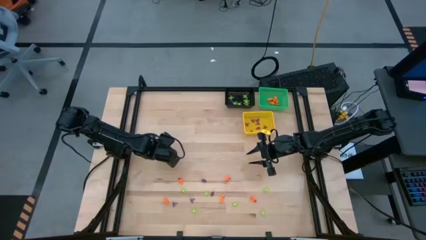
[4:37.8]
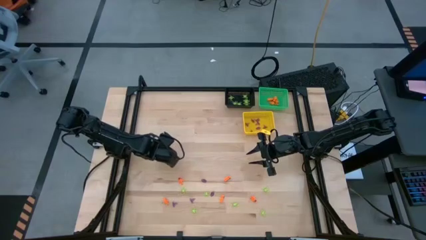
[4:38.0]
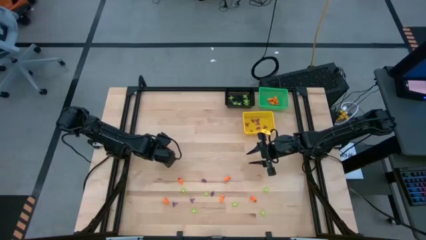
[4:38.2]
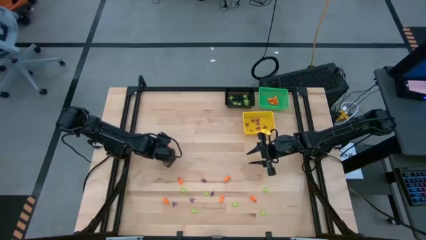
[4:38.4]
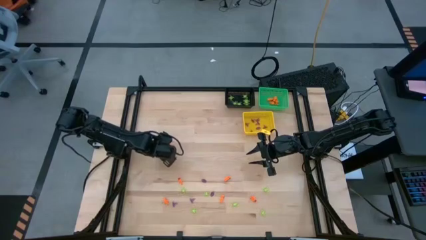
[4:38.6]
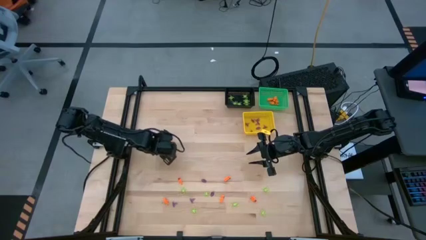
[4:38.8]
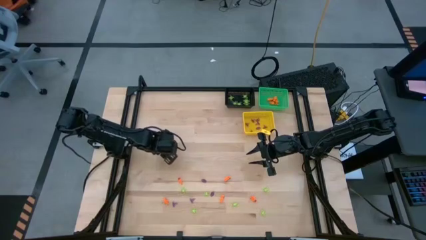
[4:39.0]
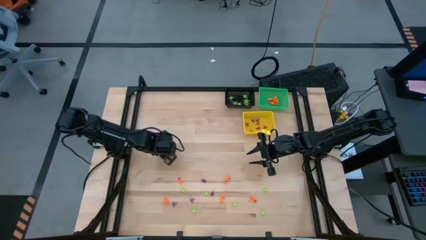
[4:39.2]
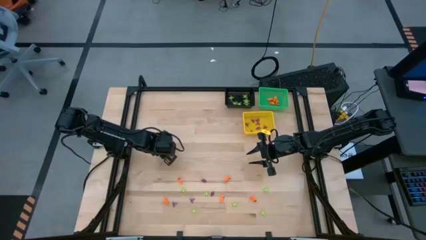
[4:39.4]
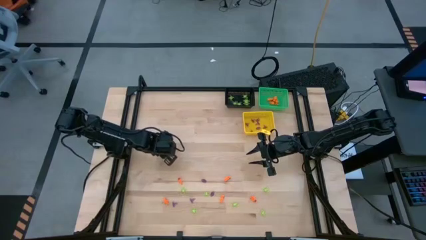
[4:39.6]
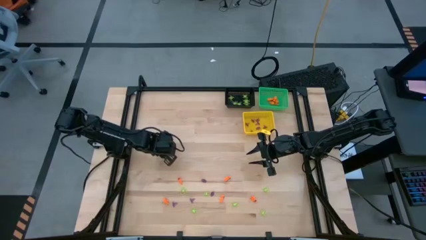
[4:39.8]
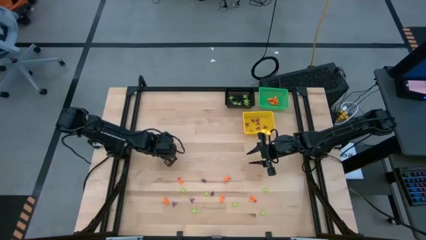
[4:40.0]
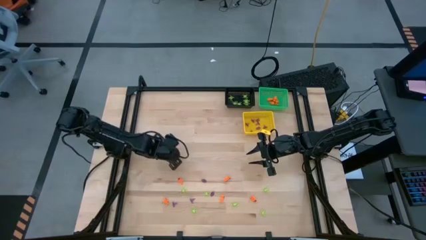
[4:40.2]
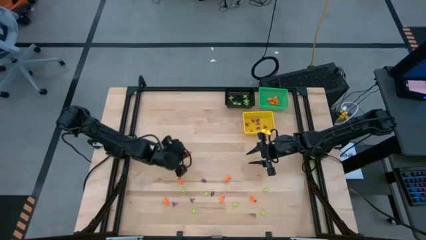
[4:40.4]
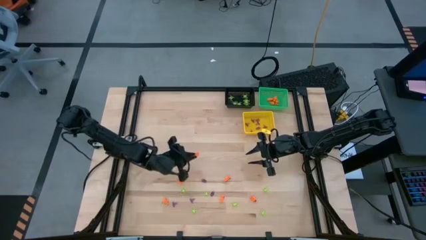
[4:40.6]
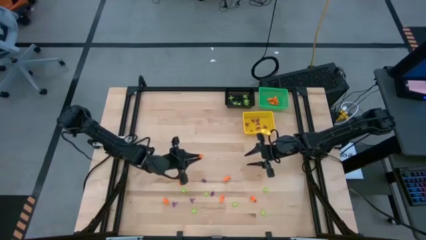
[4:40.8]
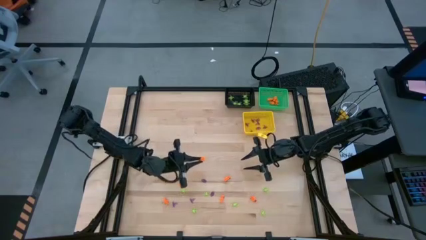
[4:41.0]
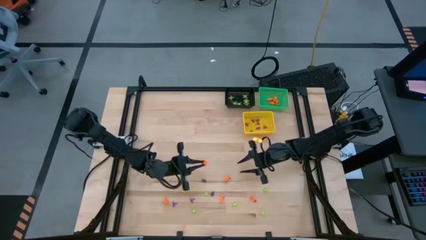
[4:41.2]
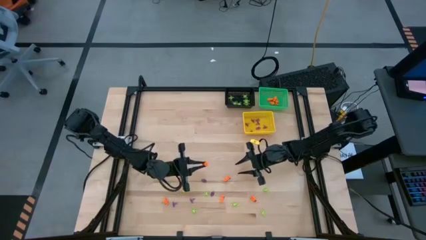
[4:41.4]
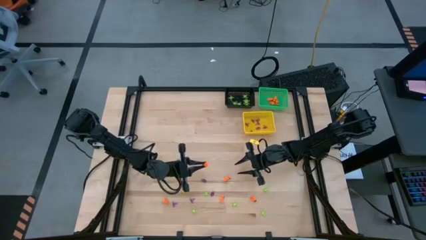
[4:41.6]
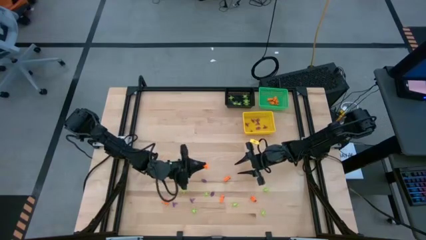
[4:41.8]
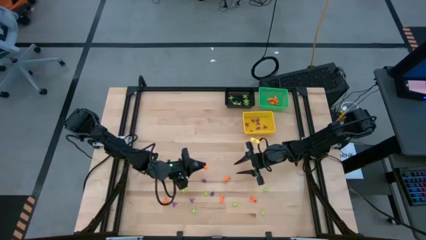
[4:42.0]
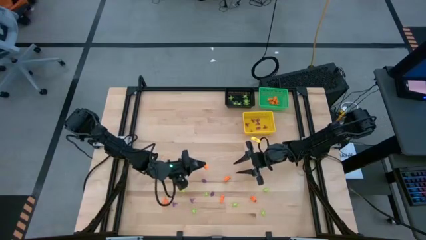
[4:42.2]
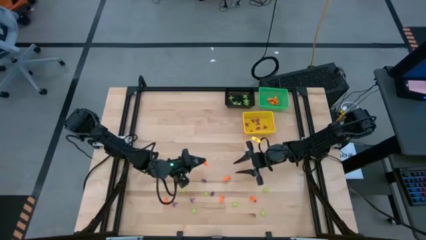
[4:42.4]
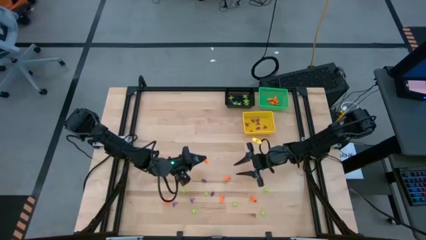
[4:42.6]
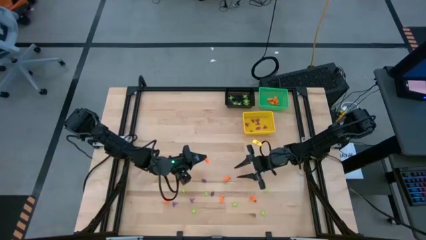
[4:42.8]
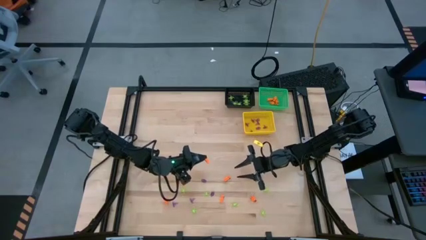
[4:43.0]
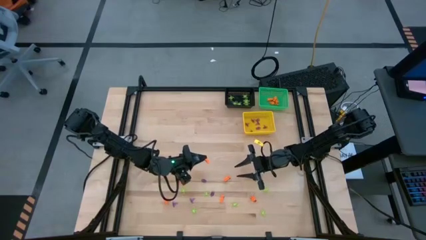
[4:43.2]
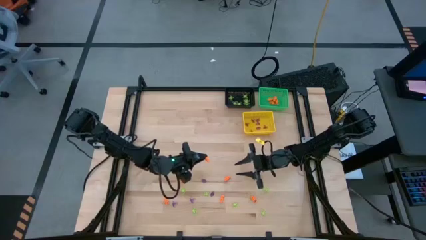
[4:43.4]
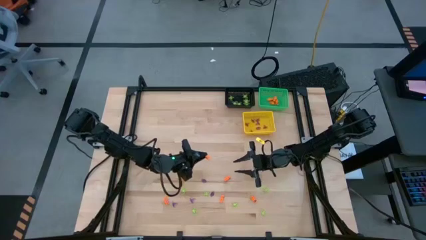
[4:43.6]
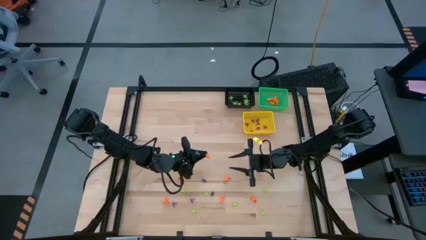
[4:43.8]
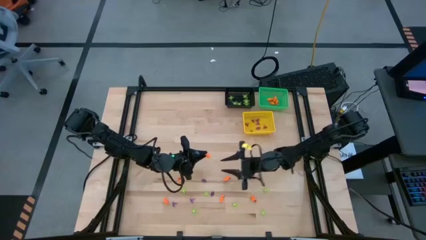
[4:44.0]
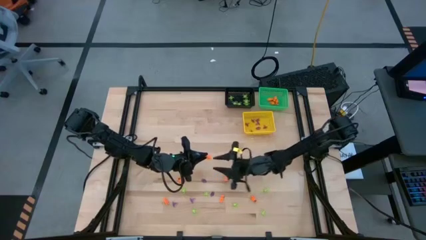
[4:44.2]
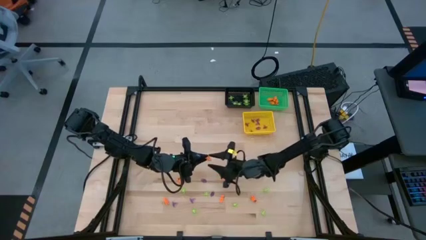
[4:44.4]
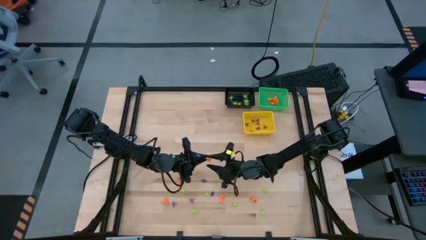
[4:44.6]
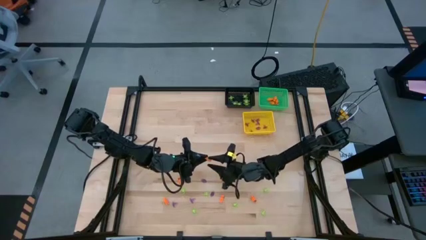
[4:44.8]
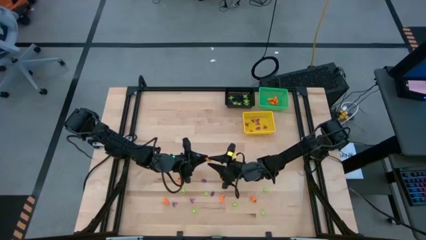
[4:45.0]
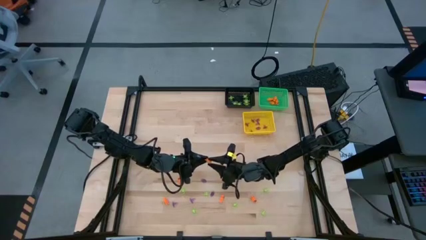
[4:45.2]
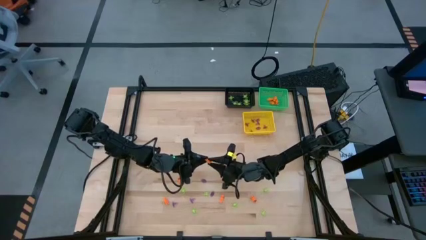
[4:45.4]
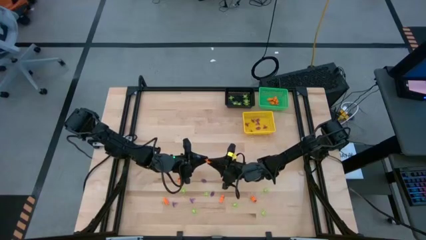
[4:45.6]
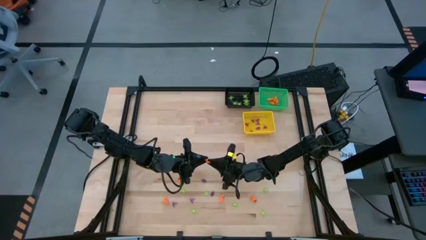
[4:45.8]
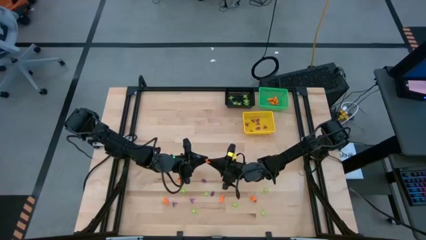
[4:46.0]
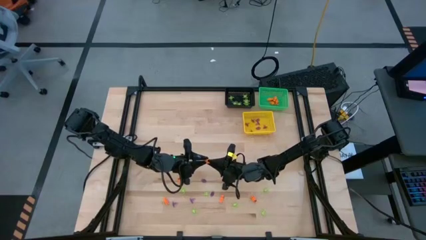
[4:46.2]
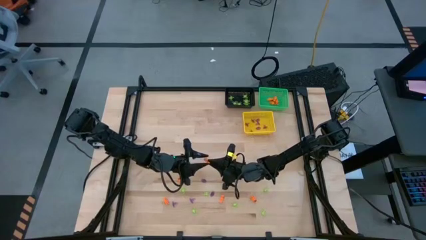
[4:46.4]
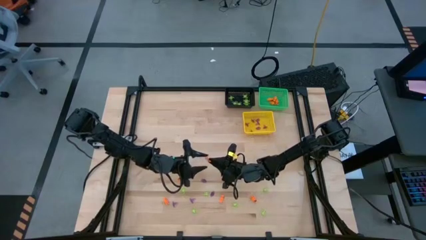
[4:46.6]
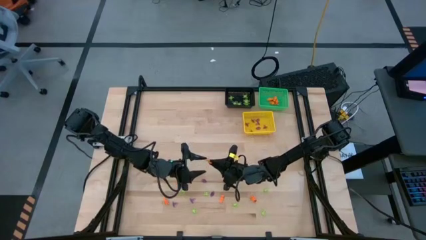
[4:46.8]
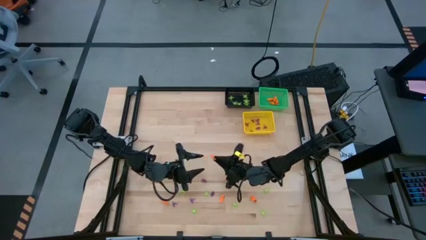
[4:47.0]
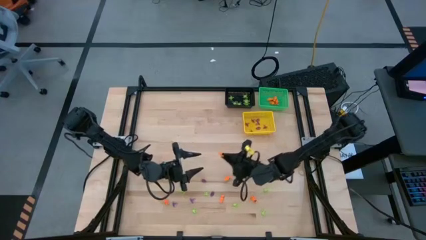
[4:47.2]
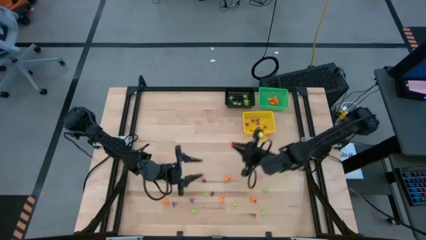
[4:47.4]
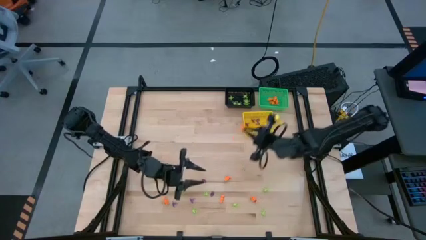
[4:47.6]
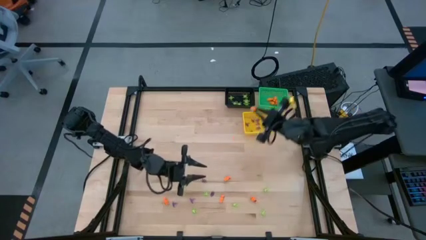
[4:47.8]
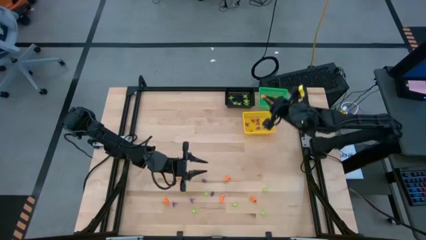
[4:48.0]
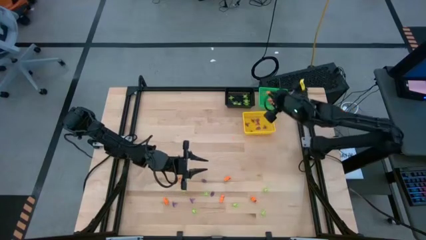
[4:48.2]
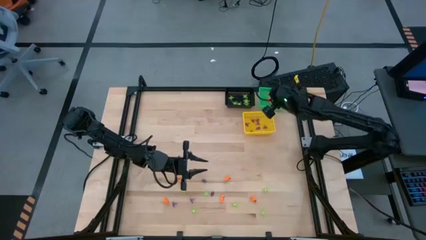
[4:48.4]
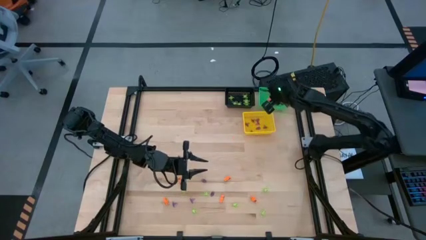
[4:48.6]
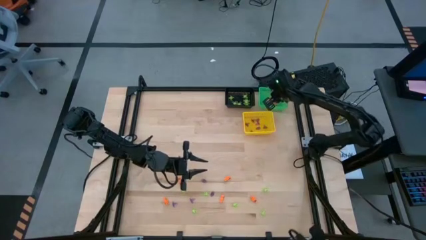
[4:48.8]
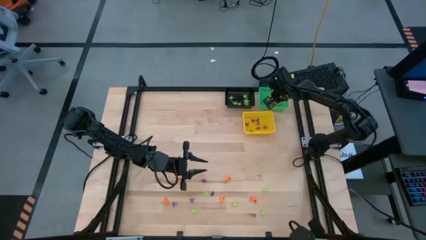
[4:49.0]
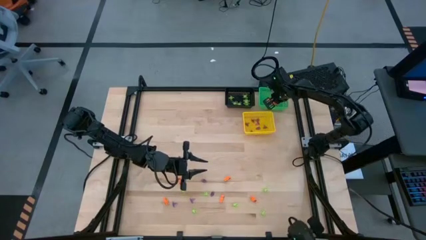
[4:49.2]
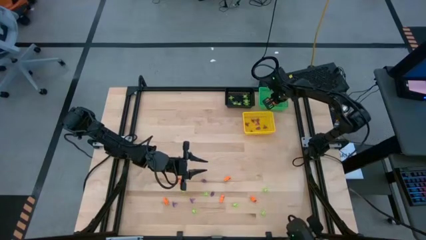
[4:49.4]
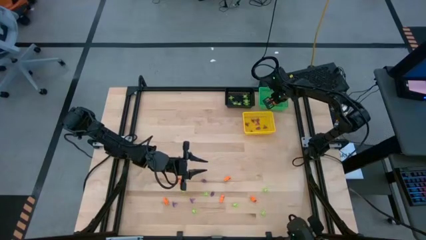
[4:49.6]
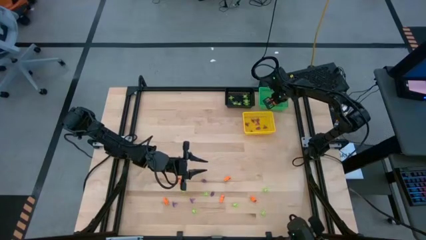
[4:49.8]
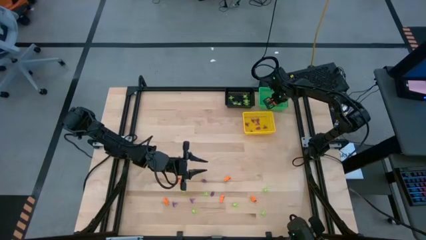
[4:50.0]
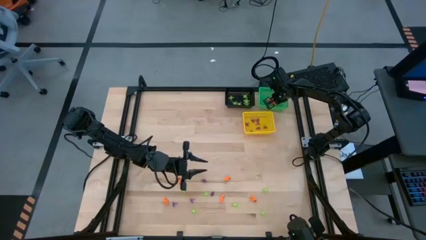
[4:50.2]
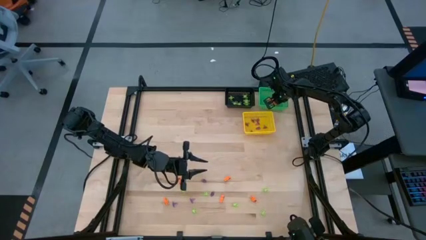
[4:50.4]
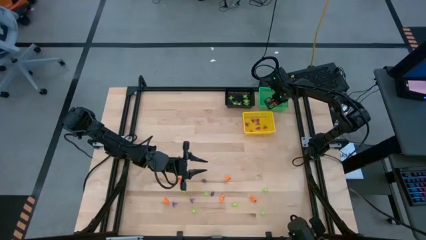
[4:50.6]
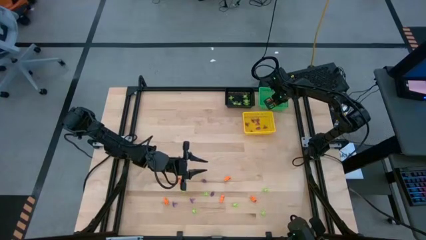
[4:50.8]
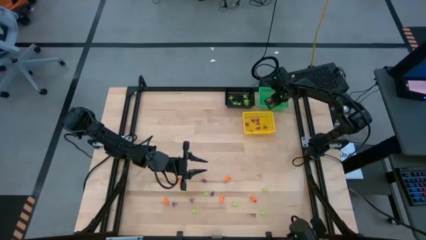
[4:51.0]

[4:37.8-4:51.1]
Task: Sort Halloween decoration
Put the orange skeleton toy into the green basket

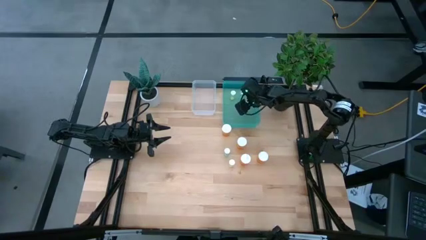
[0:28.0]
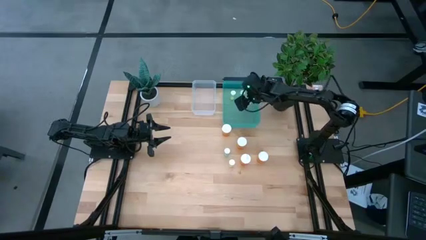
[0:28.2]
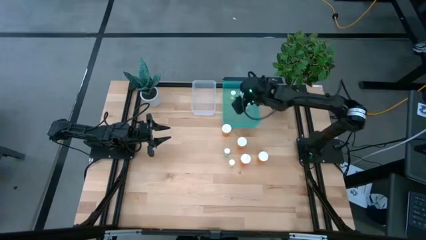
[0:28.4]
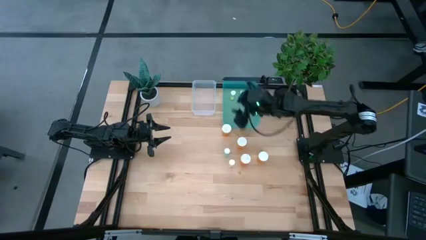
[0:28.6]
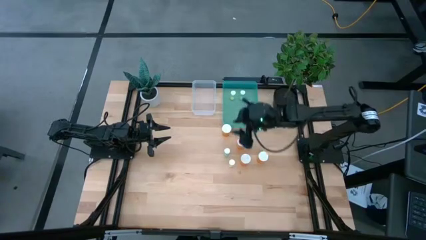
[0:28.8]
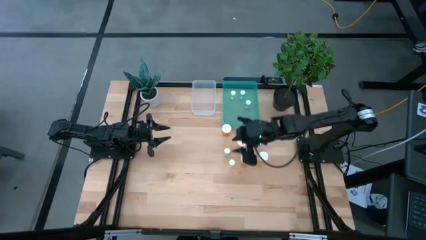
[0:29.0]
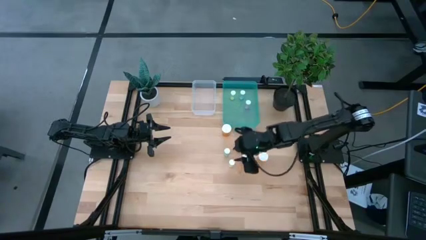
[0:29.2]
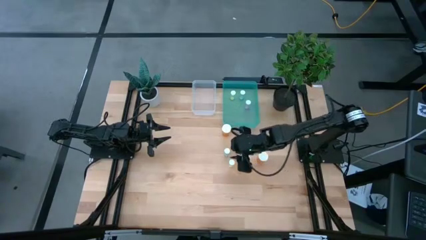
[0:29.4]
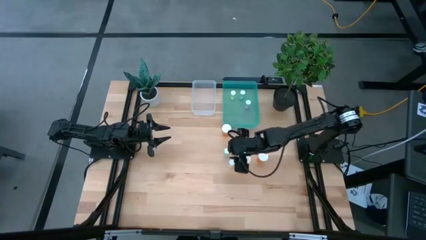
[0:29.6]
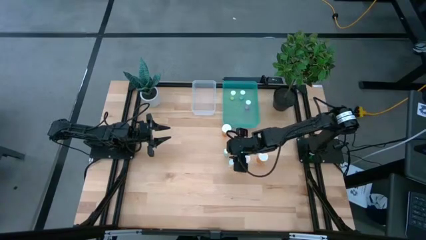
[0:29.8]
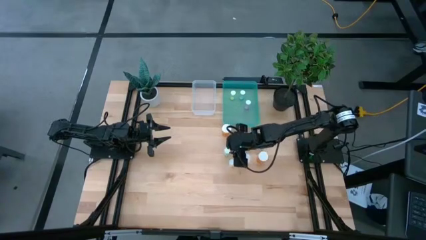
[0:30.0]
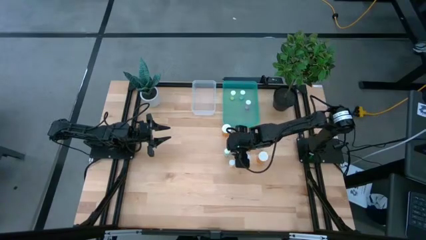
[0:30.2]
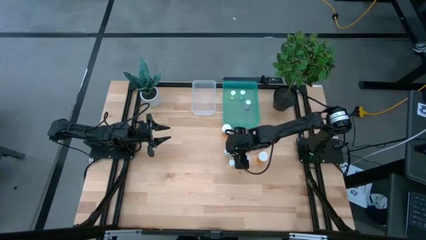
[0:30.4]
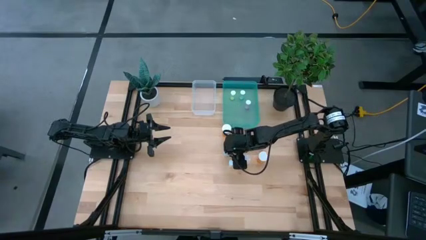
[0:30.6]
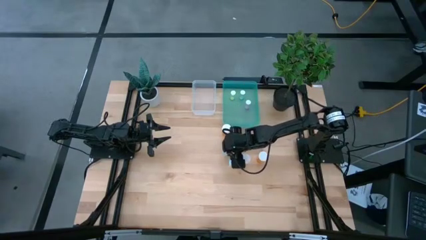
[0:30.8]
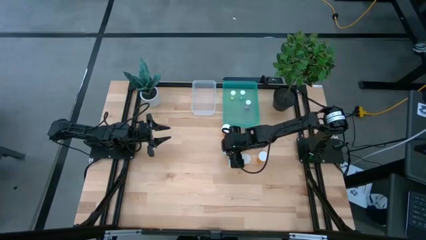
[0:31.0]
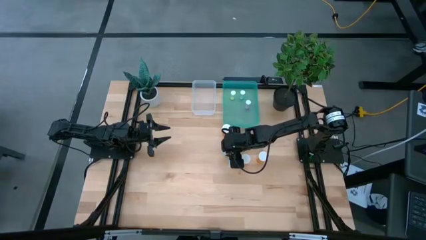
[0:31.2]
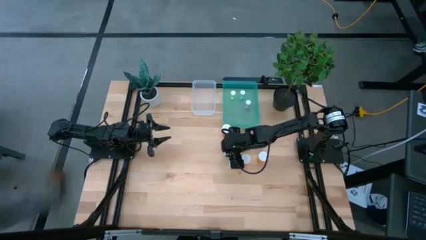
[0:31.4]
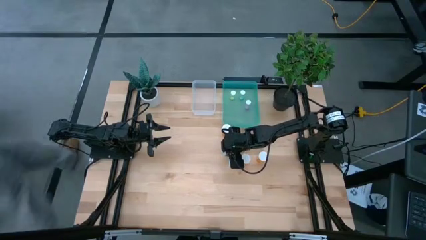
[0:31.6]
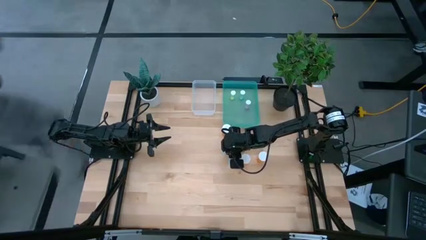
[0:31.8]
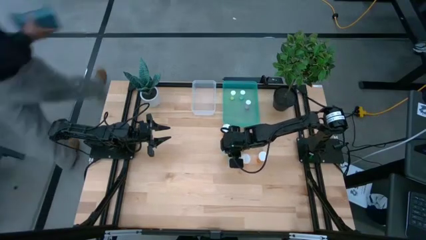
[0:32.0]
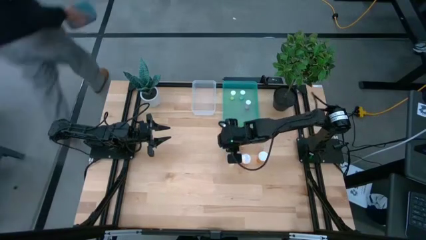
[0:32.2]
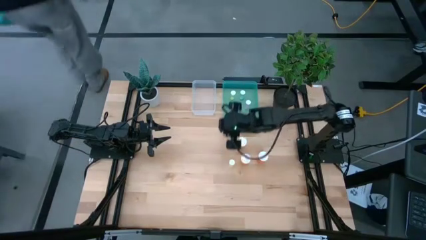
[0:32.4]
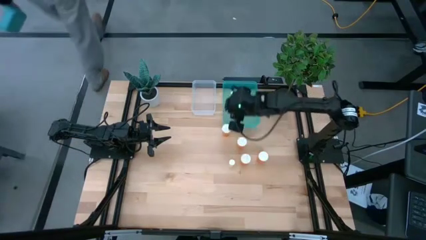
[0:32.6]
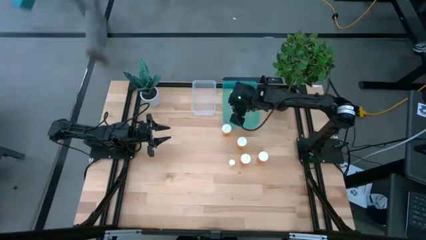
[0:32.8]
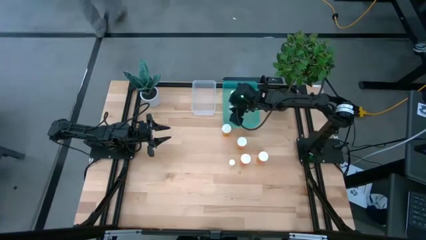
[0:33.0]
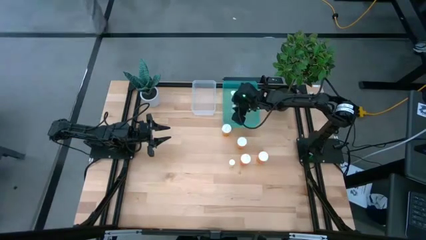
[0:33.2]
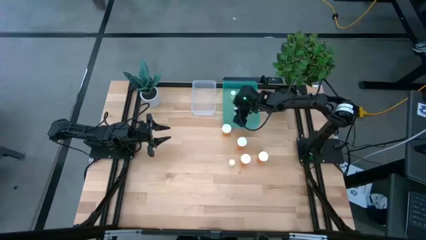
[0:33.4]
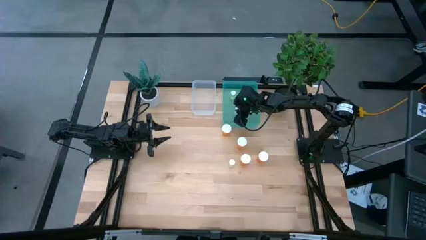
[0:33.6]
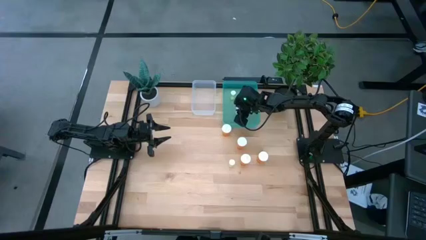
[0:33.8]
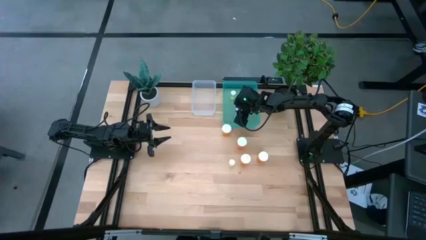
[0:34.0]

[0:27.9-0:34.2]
Task: Pick and place medicine bottles into bin by pill shape (circle, oval)
Put the blue tablet bottle into the blue bin
